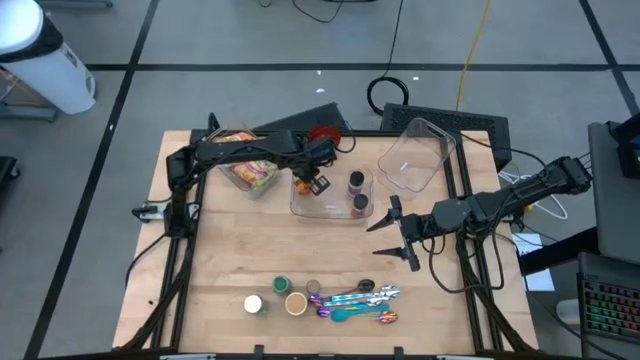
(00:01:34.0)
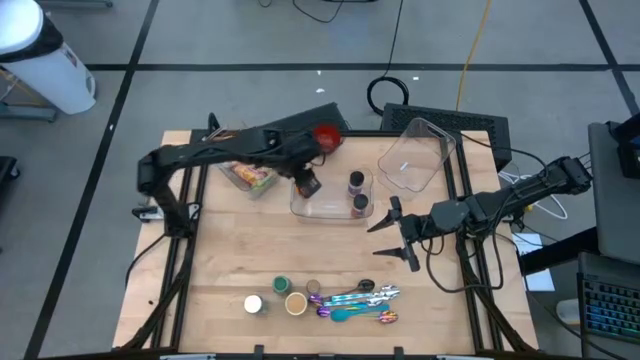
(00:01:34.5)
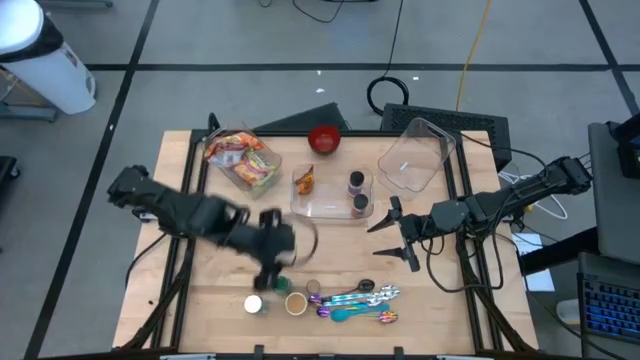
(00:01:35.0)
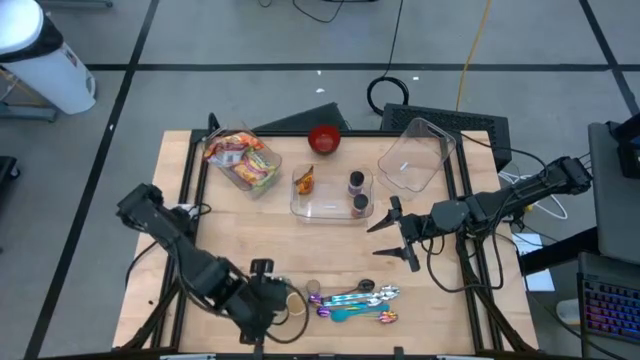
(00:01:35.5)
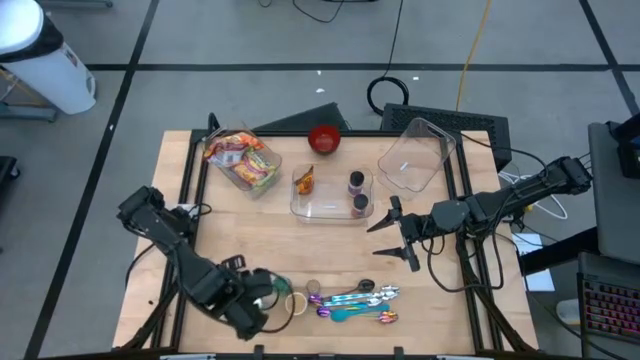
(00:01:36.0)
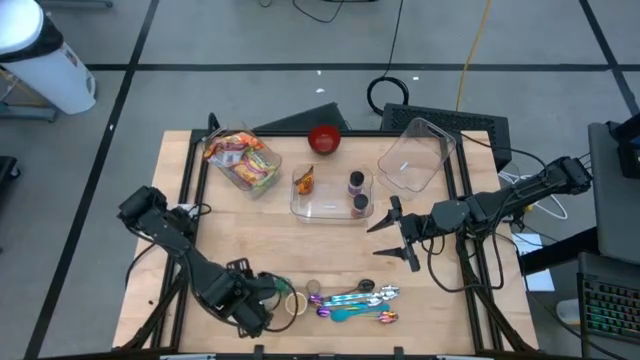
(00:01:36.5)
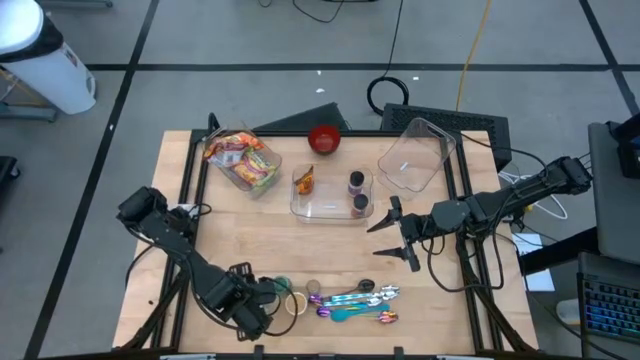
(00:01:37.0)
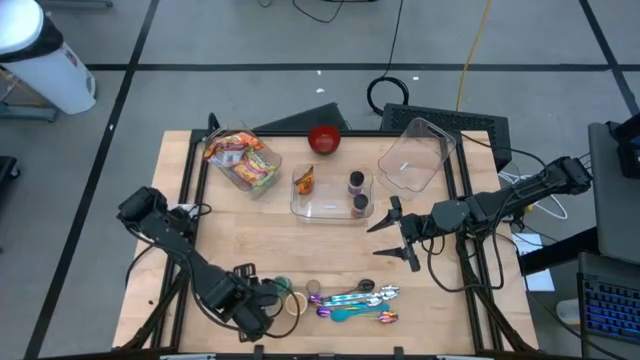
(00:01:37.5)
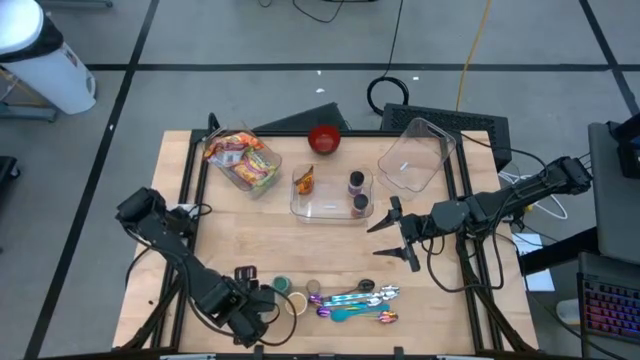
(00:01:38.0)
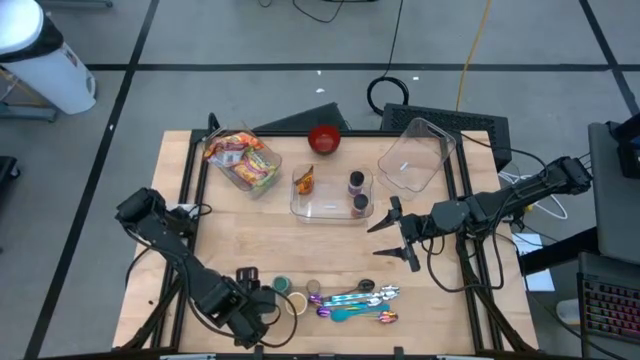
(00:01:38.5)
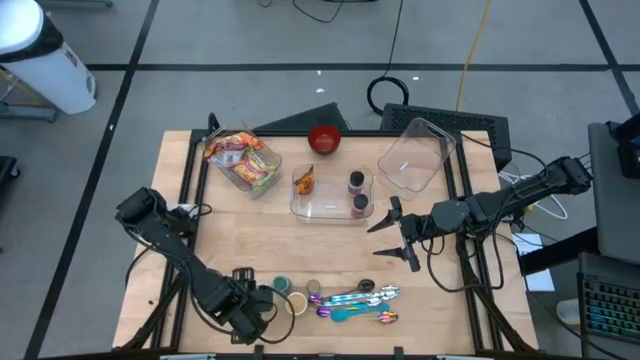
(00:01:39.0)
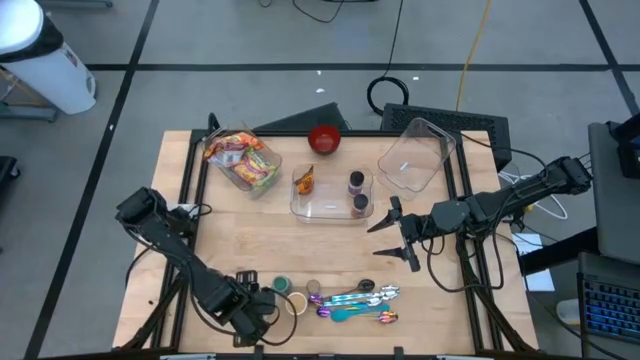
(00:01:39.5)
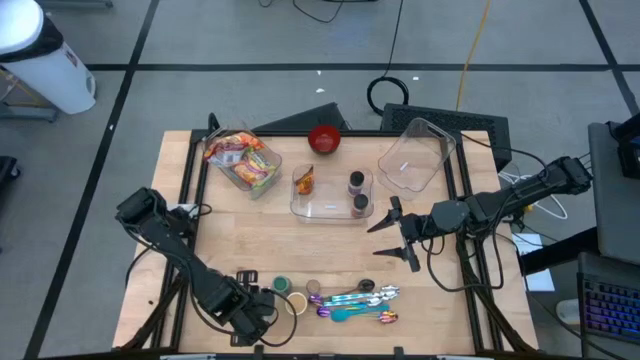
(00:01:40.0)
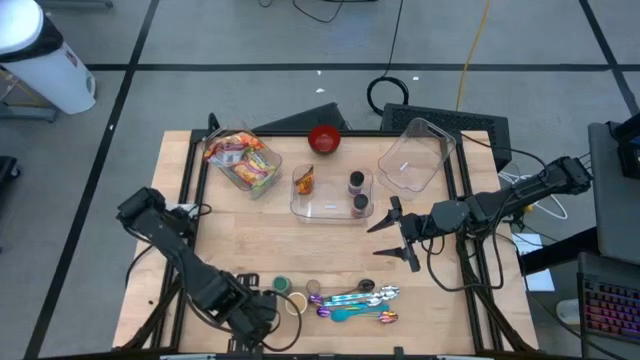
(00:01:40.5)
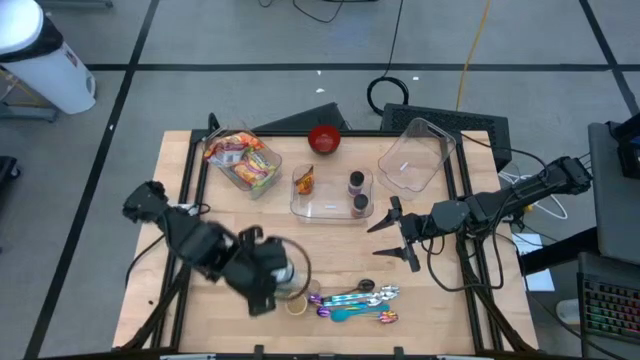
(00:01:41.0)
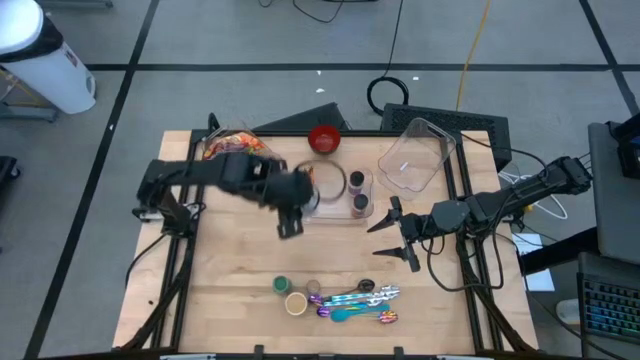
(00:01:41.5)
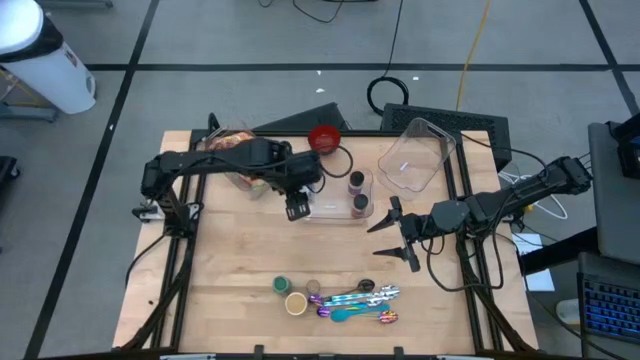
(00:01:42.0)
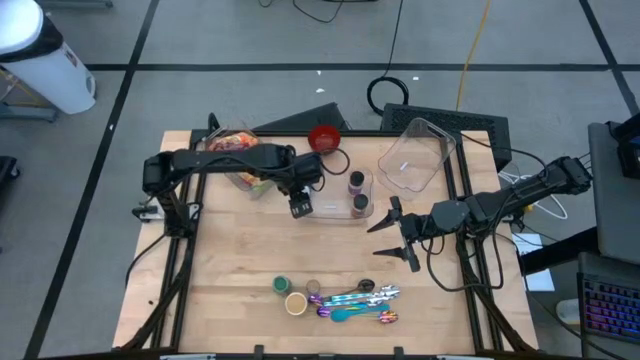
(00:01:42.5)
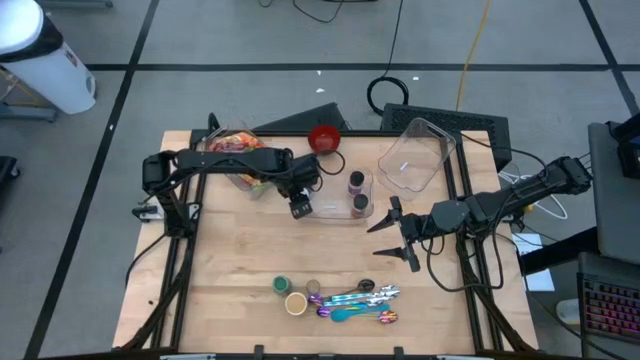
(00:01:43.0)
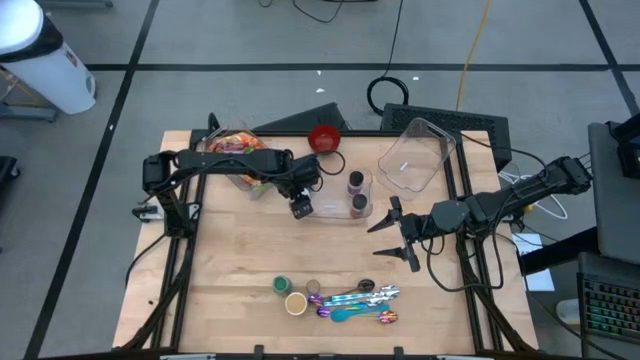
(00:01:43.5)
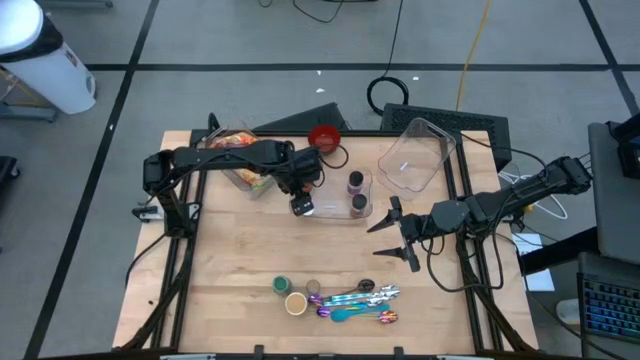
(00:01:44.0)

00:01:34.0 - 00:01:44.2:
Task: Pick & Place Food Item
Put the white seasoning bottle into the center transparent bin

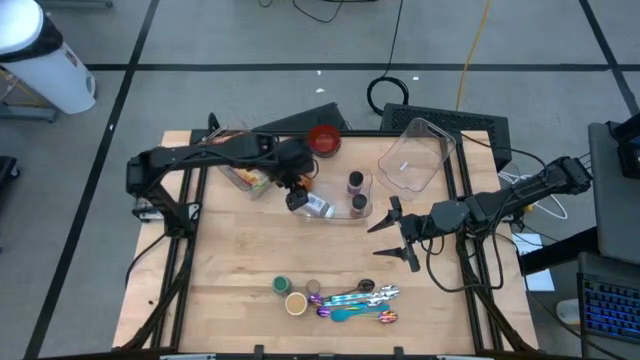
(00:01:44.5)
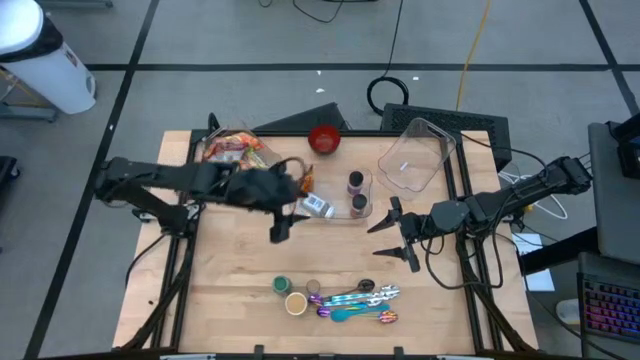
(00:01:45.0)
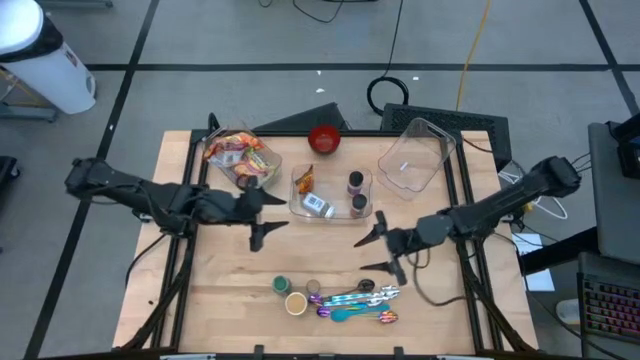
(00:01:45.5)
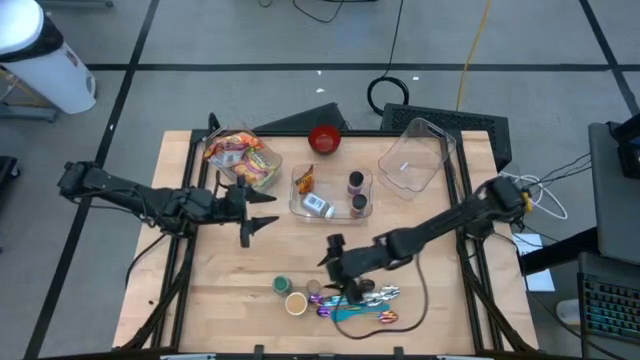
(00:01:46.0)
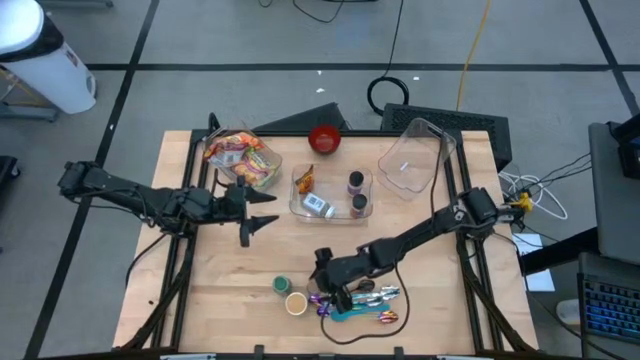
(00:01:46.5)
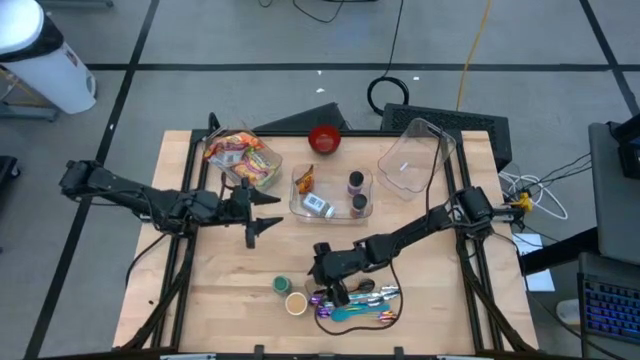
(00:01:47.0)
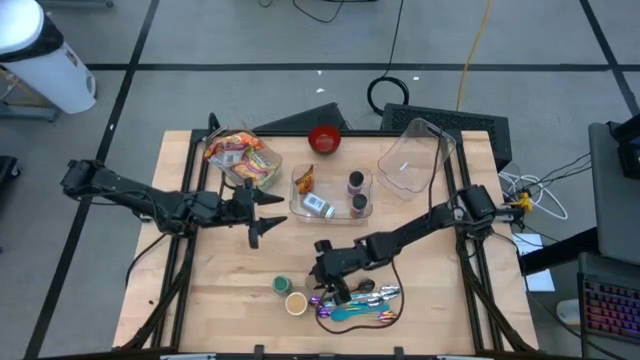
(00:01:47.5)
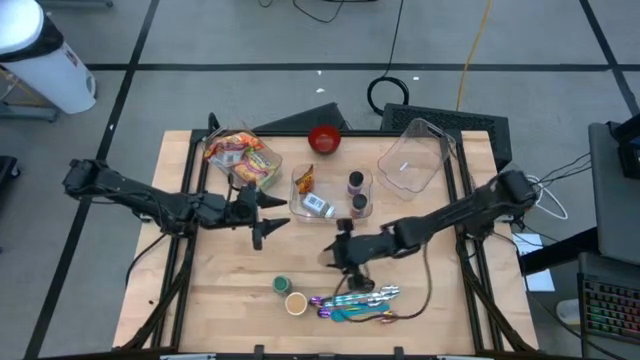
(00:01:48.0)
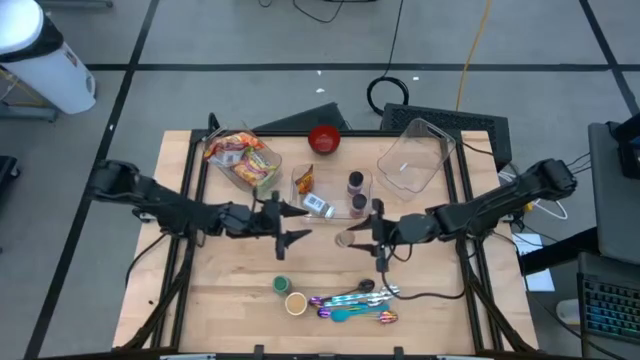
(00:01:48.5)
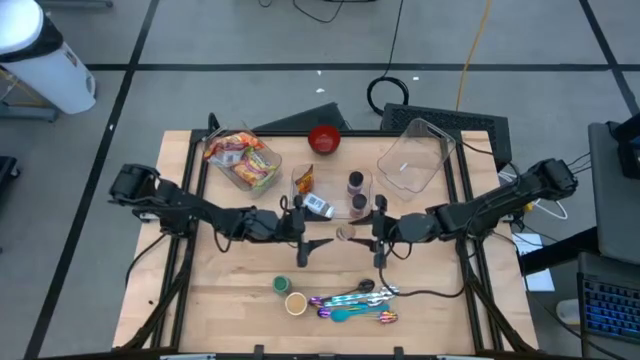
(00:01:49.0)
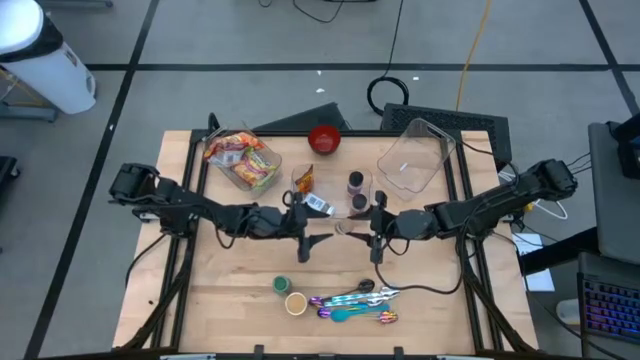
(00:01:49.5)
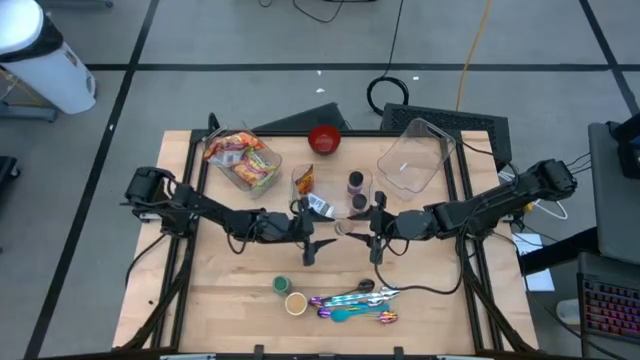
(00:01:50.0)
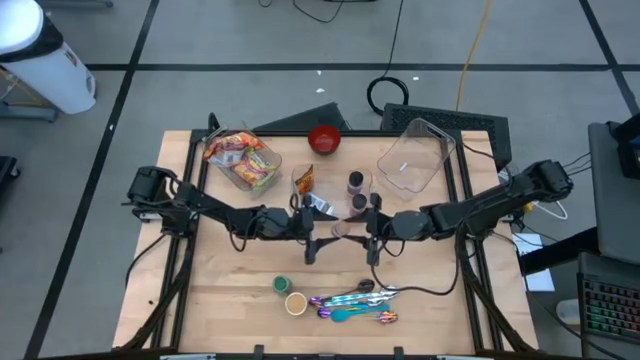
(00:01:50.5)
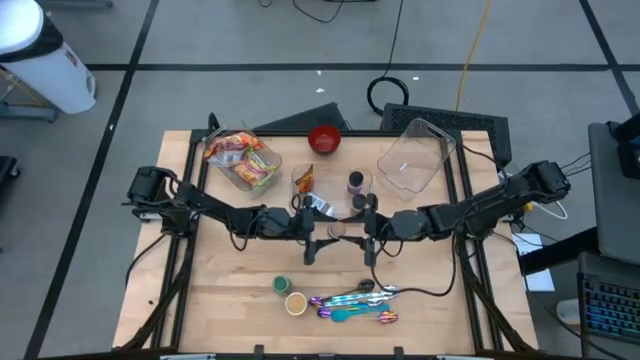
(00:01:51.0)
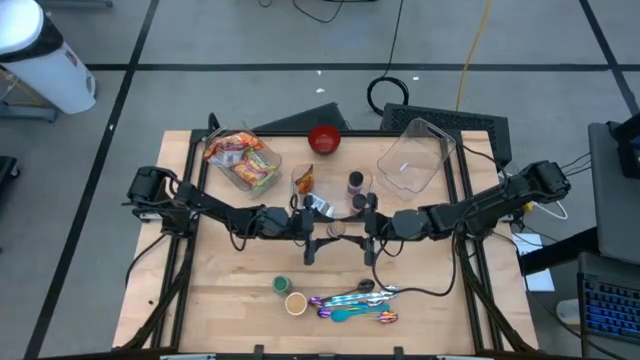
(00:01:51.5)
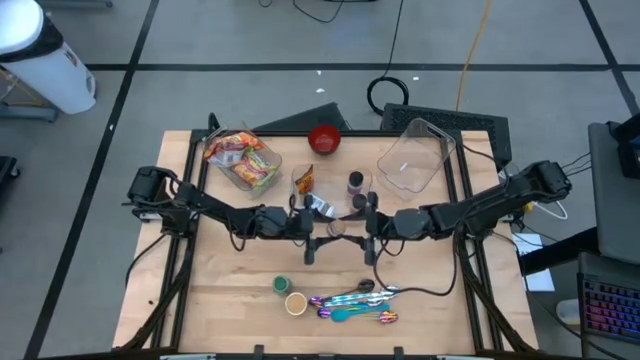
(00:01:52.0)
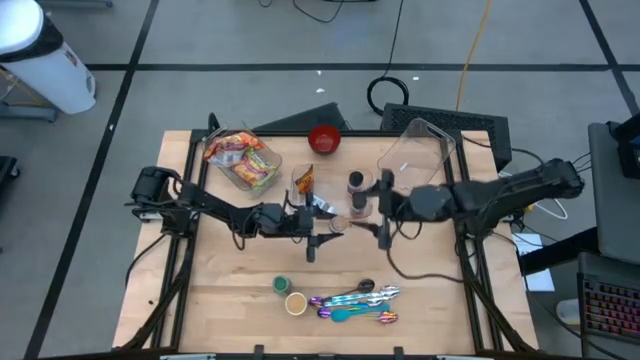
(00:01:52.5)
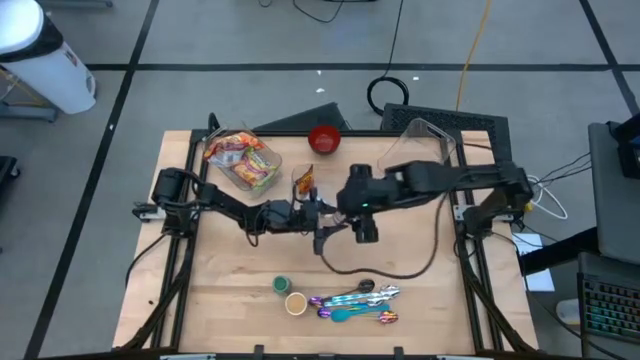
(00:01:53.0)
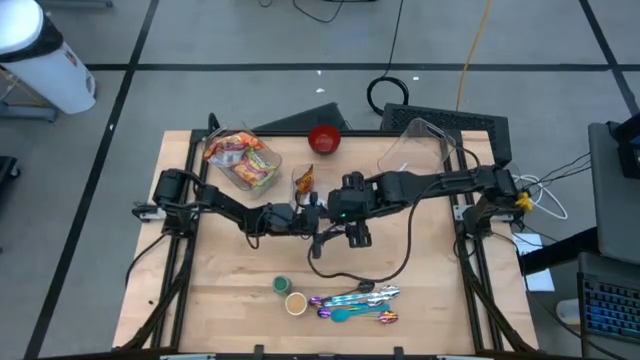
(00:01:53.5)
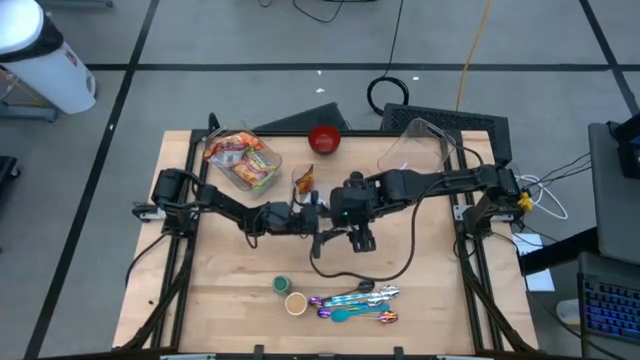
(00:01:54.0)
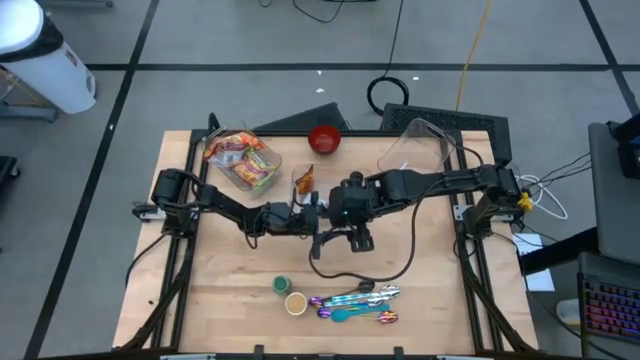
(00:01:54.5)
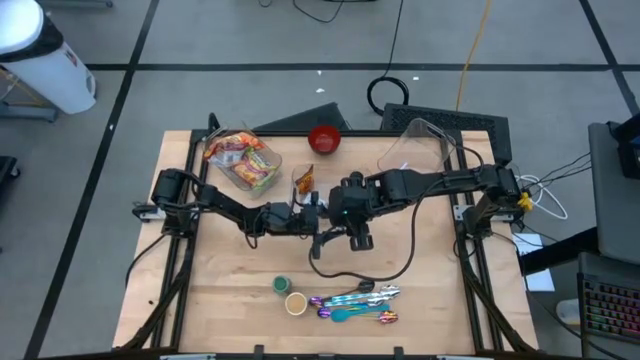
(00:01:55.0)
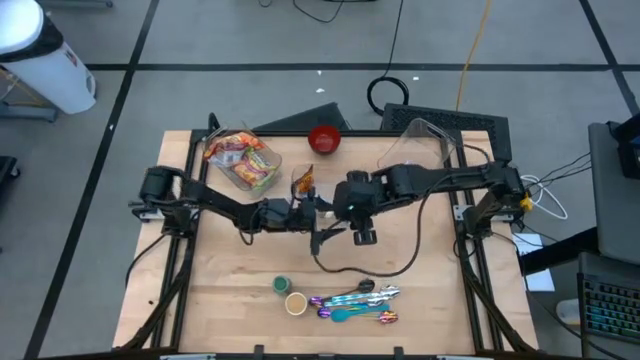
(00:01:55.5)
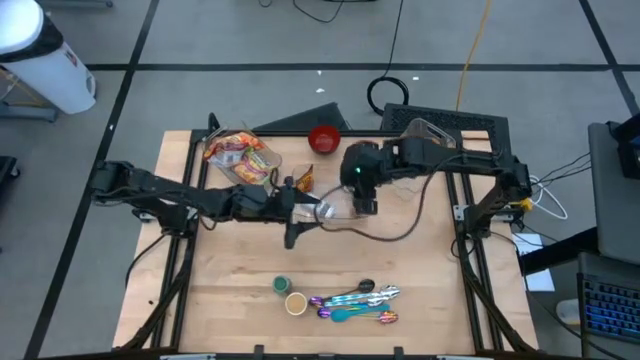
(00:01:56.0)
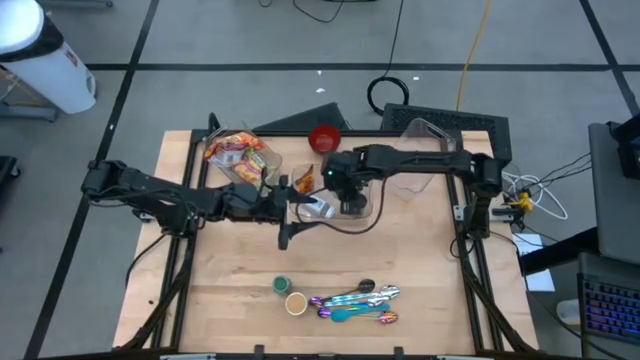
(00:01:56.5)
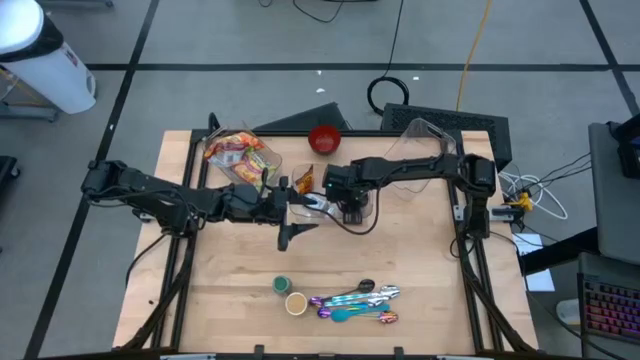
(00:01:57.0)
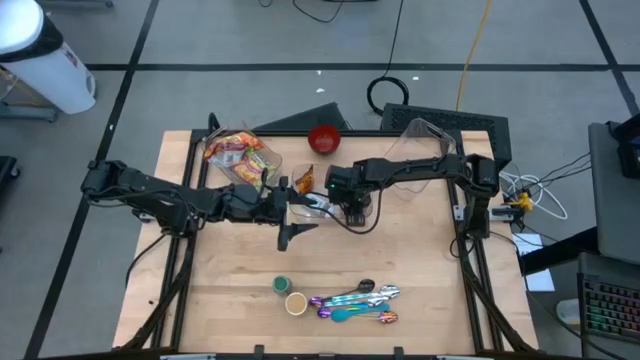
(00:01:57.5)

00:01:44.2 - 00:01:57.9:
Put the brown seasoning bottle into the center transparent bin
